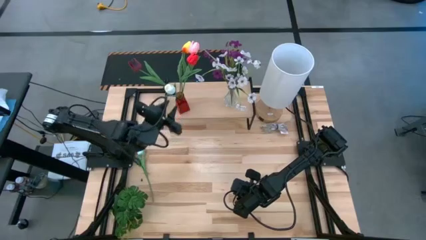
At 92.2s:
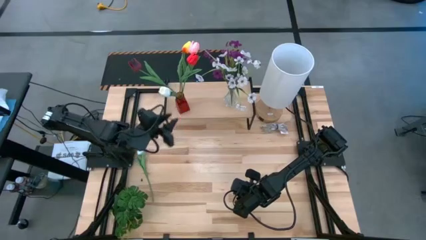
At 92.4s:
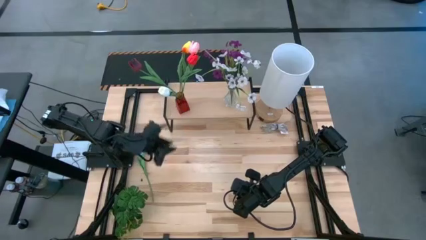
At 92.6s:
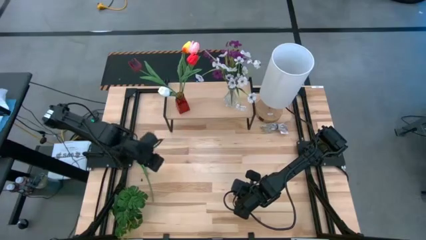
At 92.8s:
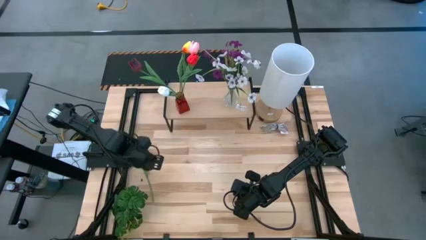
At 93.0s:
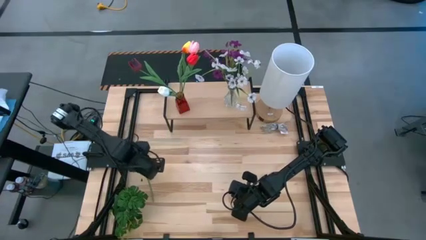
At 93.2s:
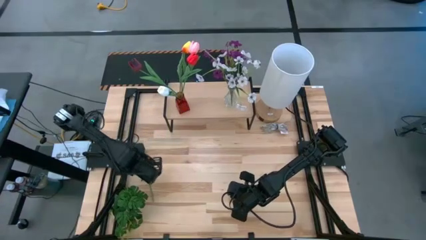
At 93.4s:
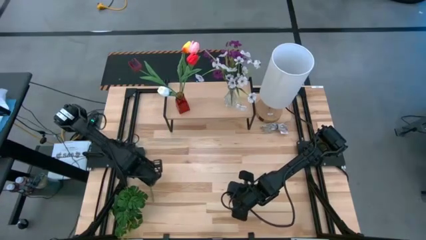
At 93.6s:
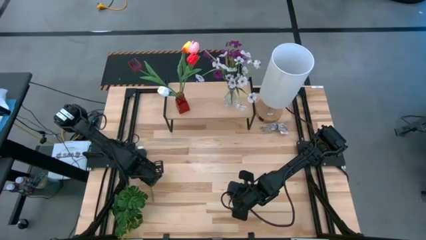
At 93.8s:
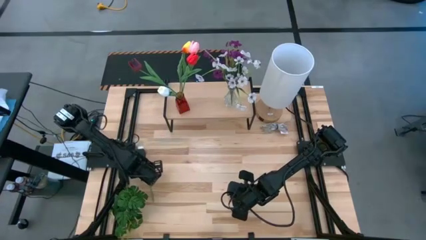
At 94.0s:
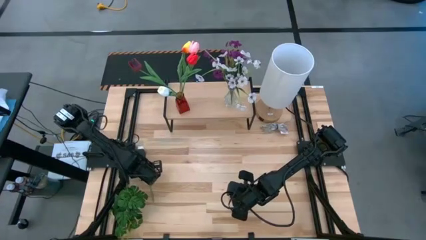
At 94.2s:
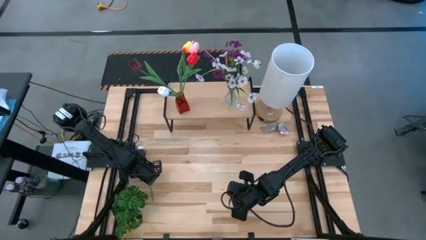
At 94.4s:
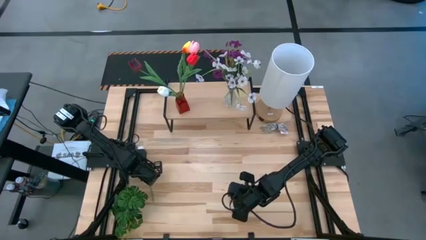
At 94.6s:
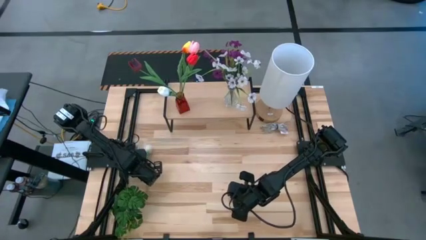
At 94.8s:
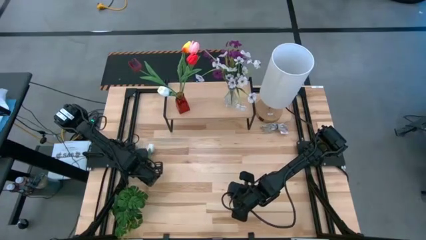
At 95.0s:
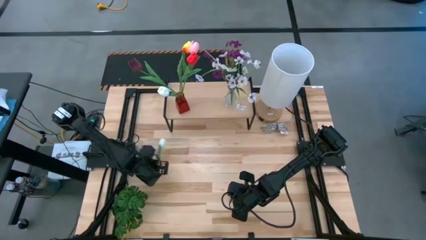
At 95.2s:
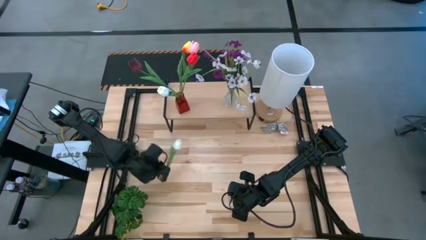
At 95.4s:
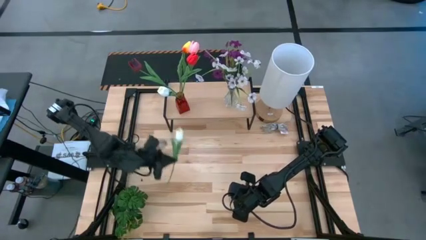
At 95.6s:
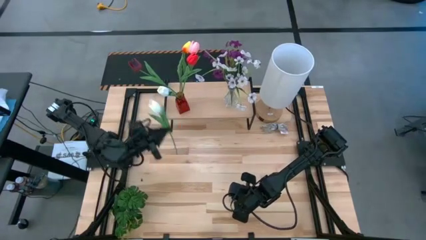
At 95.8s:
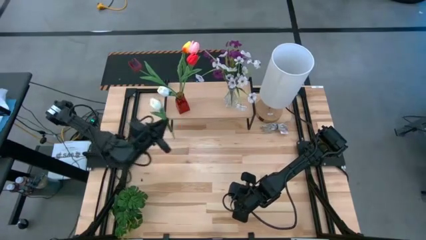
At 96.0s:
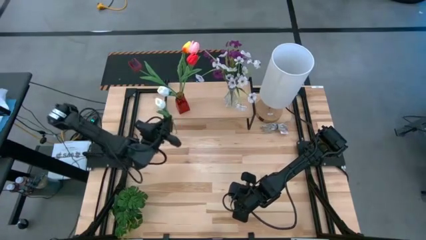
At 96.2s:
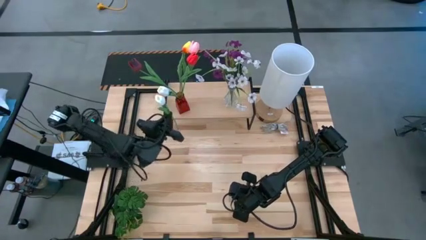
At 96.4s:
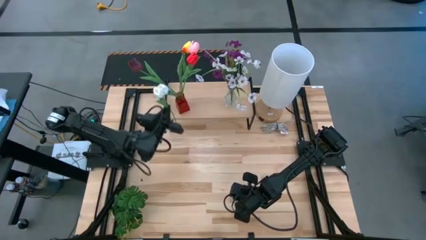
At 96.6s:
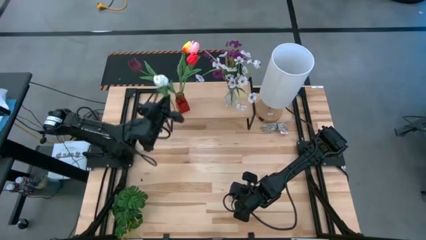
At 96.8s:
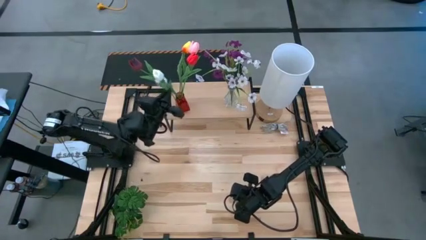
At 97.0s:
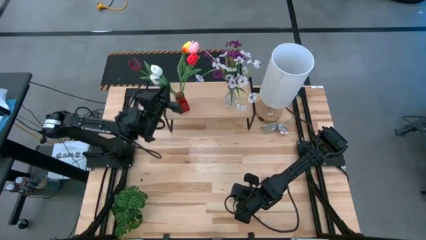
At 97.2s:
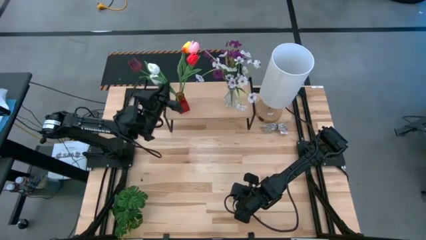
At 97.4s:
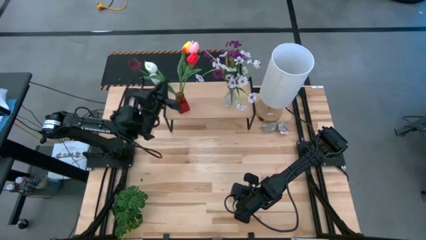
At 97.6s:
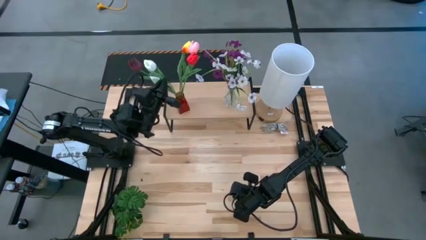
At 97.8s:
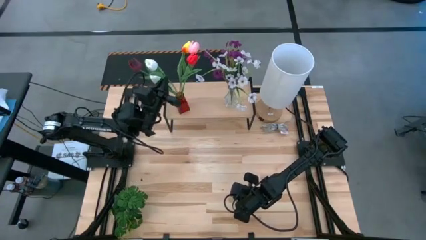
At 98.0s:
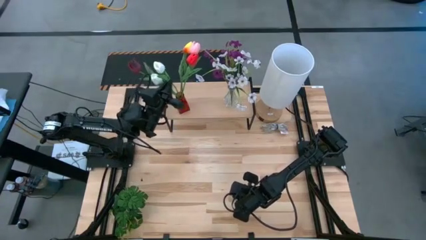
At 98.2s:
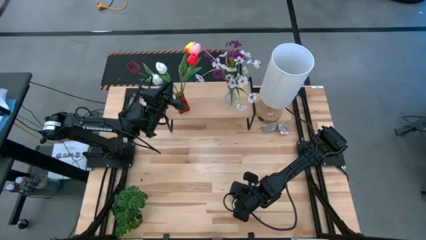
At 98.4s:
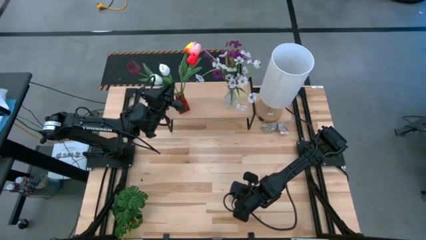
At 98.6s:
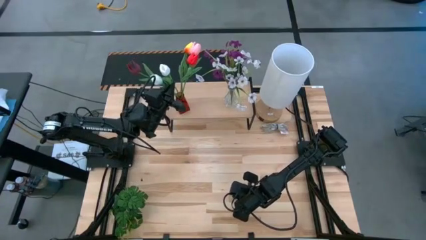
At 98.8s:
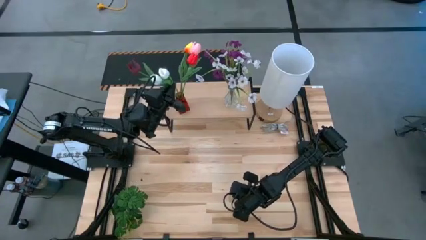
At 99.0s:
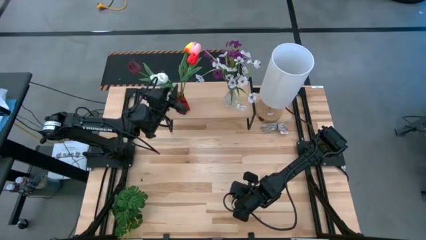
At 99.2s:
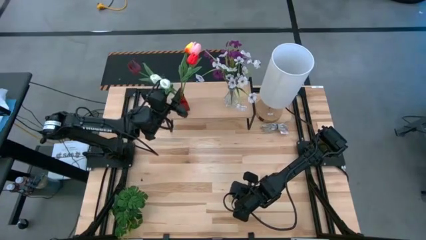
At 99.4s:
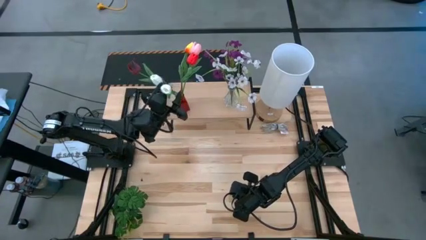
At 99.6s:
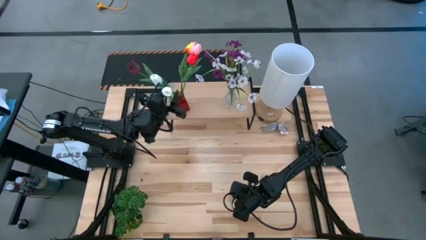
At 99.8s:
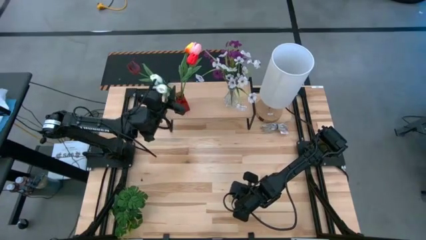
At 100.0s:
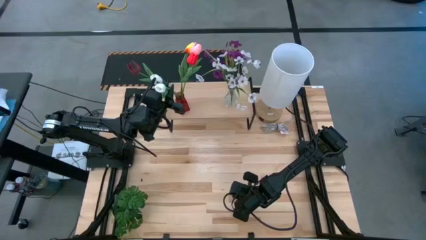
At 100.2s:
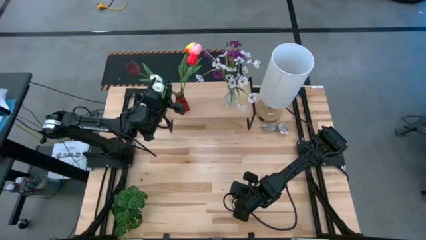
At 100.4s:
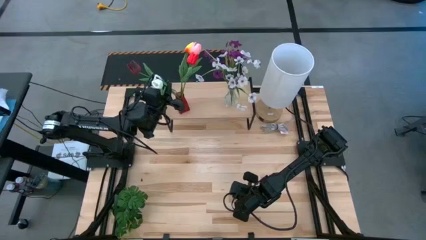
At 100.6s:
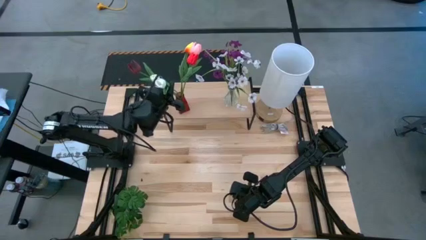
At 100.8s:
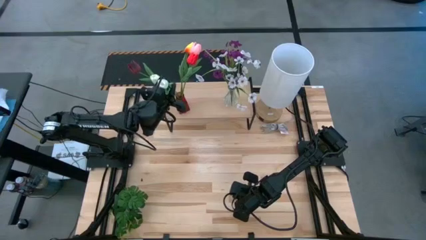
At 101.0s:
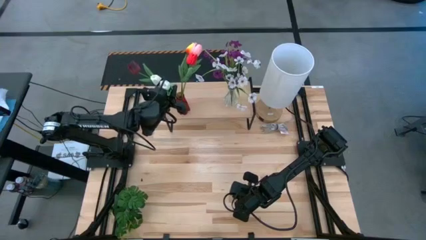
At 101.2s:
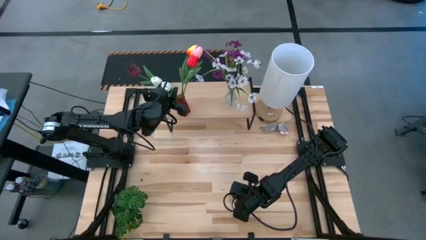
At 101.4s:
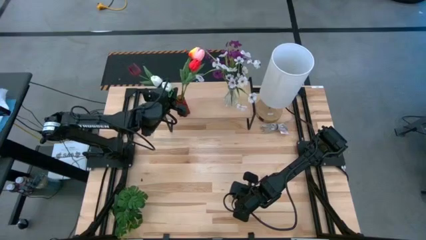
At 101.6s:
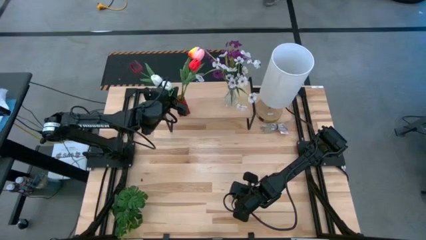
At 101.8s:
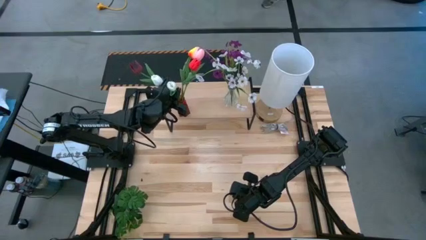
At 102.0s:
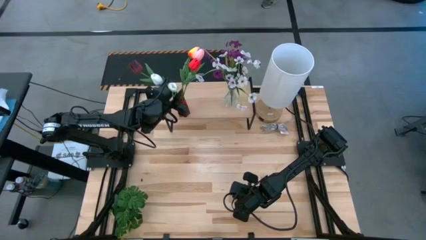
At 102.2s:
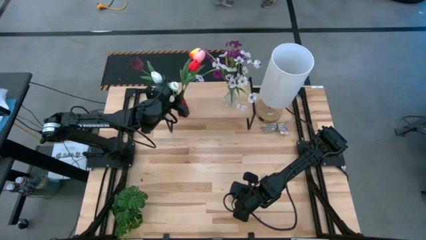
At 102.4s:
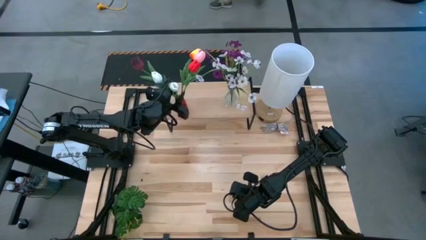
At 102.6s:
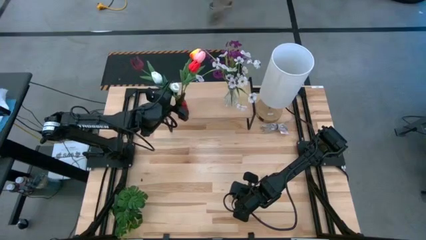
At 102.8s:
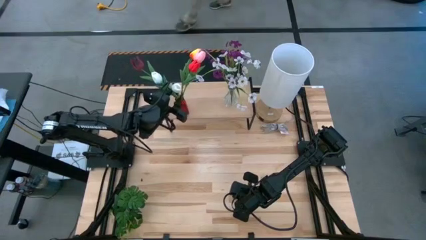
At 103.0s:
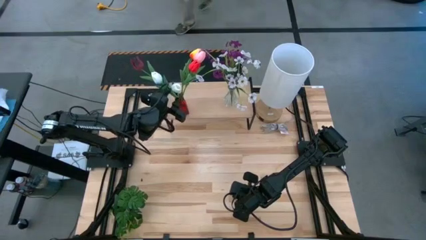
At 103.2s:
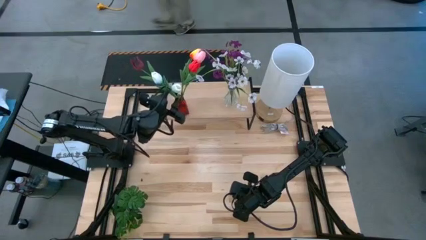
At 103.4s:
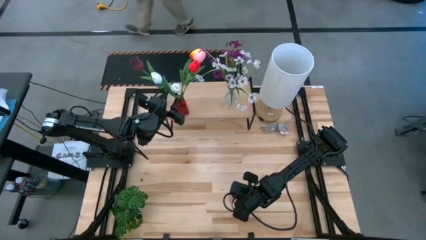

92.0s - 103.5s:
Task: Pick and place flowers into a vace then onto a shelf
Put the white flower into the red vase on the shelf

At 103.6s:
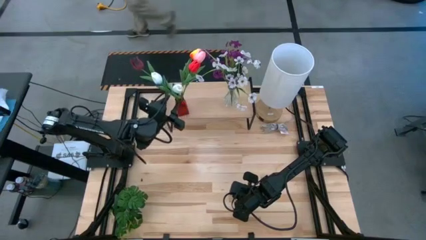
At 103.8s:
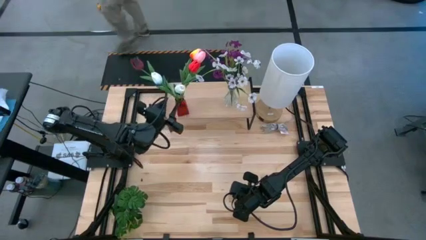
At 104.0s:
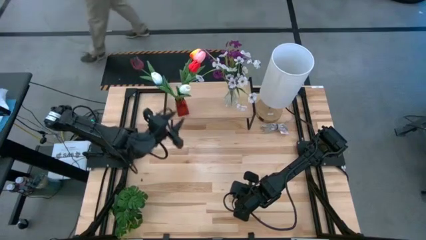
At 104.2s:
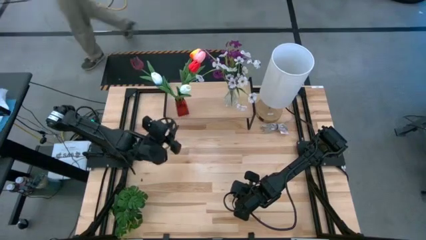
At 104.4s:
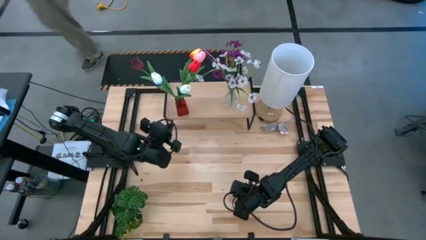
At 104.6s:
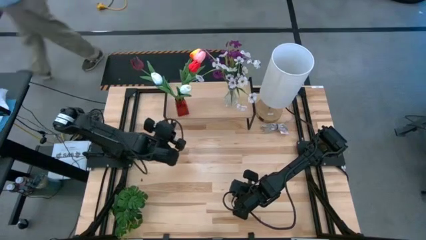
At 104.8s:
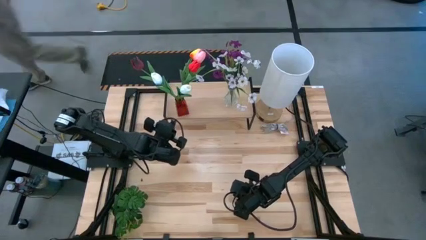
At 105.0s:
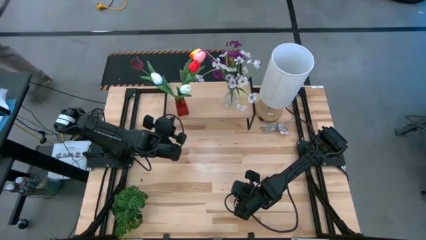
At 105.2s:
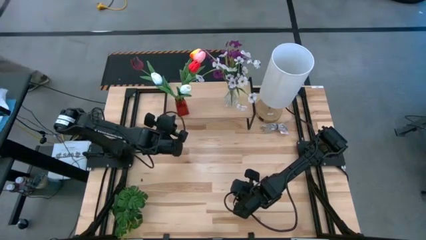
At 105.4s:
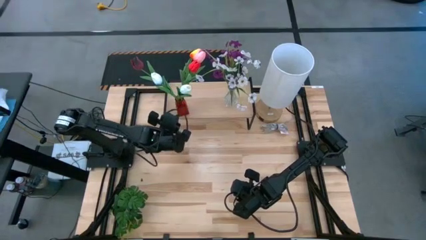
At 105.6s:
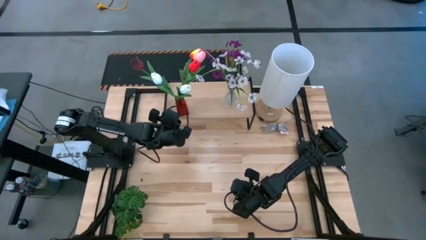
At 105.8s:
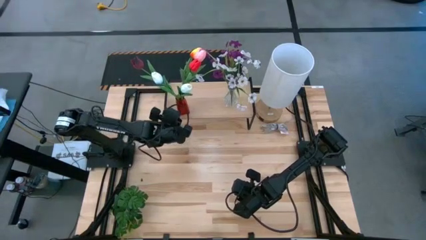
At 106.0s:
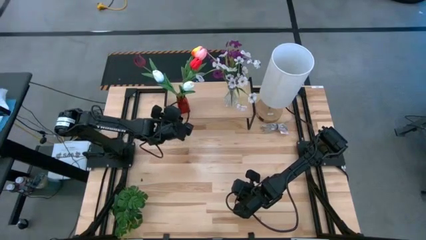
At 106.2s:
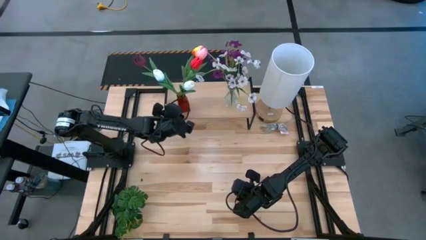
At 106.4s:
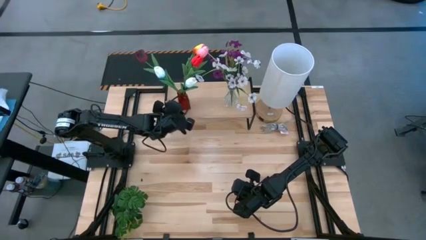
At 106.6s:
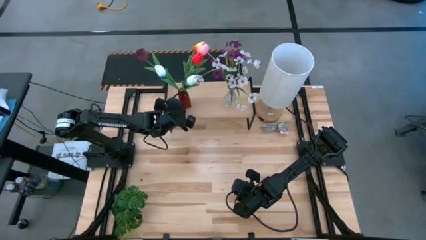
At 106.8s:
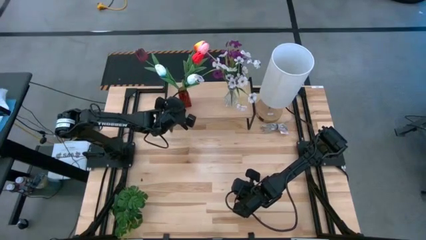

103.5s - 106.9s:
Adjust the red vase on the shelf

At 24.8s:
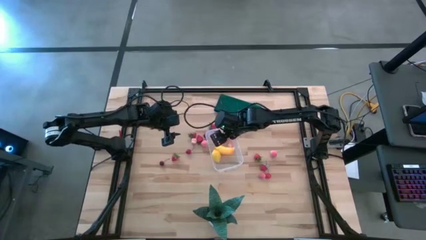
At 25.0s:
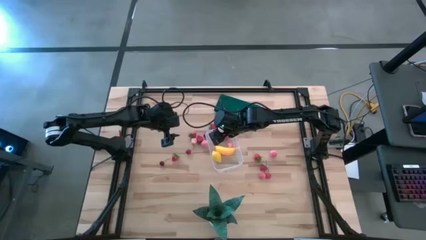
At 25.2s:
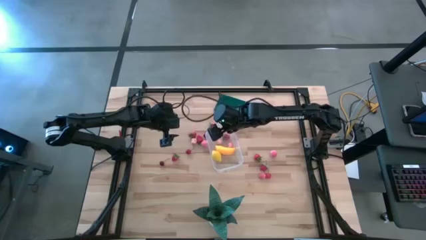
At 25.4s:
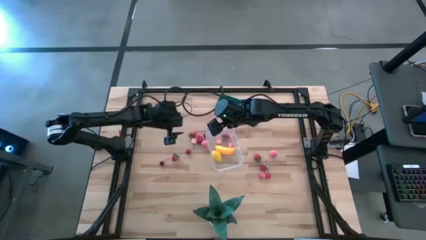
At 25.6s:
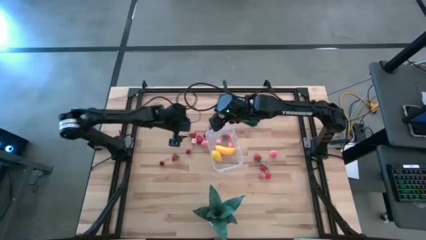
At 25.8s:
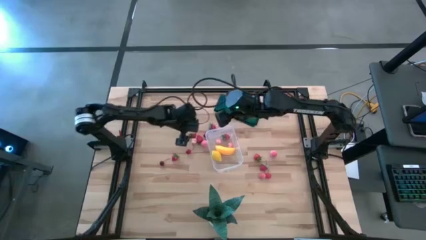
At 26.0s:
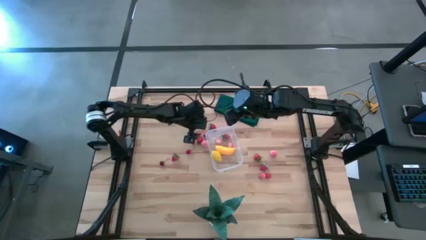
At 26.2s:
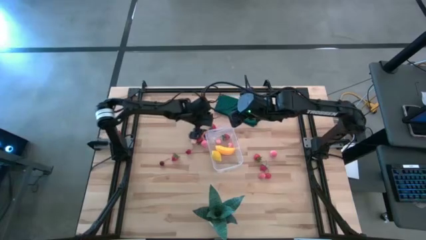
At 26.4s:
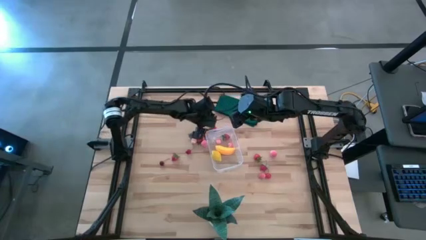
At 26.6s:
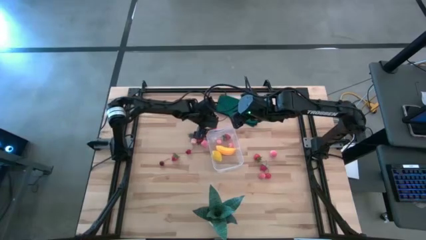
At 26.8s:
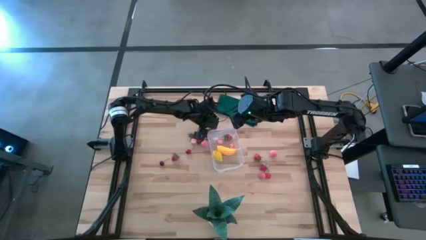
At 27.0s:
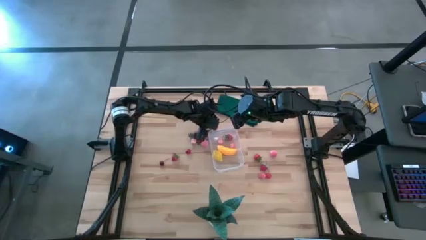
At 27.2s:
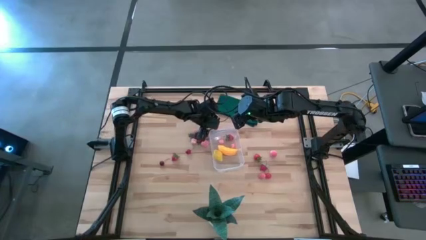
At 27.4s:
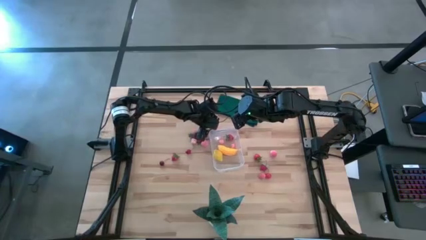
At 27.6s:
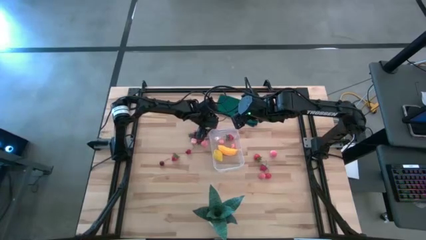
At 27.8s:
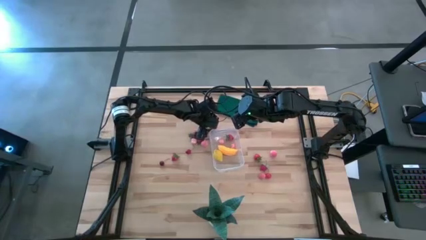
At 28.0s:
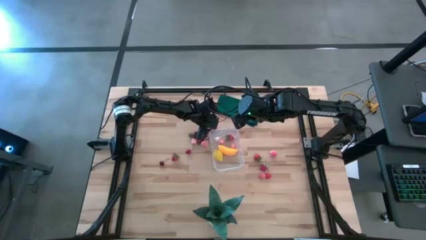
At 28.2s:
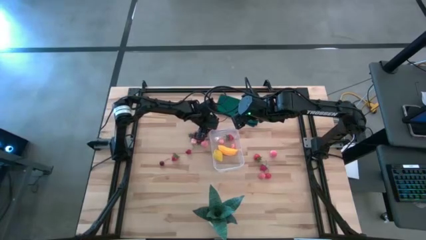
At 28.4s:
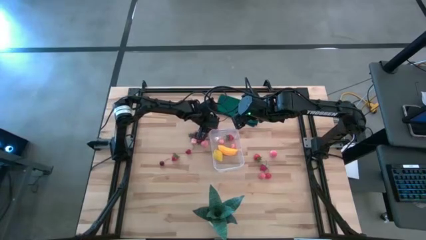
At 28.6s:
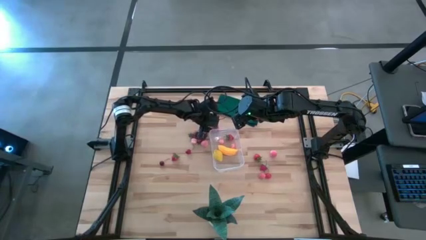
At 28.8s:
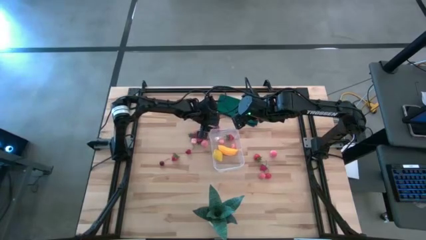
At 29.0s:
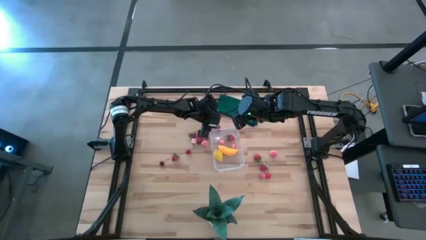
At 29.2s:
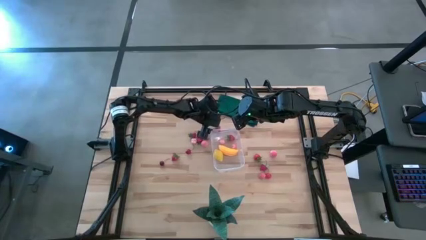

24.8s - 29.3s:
Task: Pick and placing Produce into tupperware
Put the strawberry into the transparent bin
